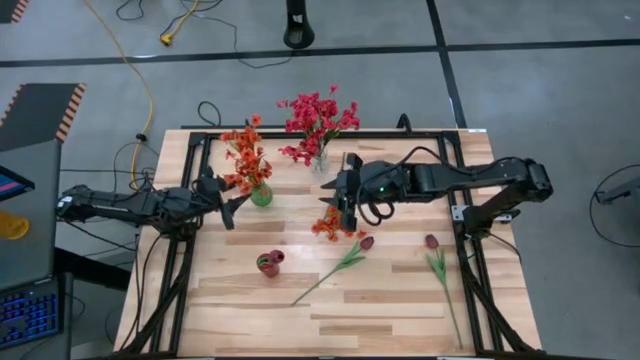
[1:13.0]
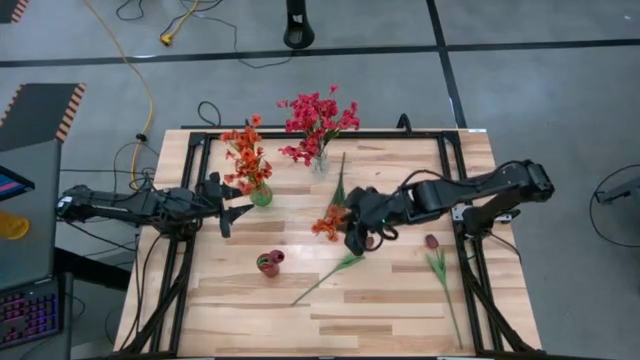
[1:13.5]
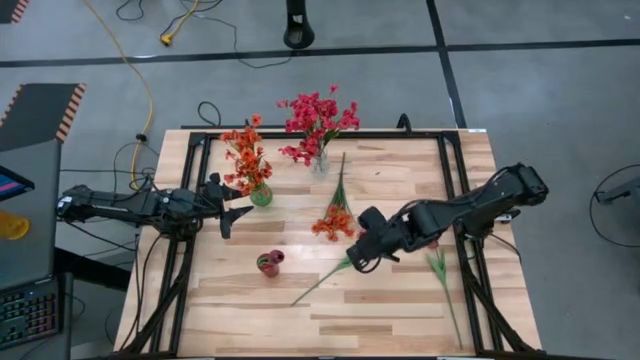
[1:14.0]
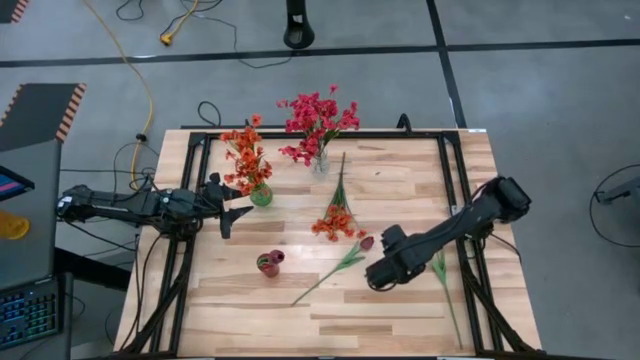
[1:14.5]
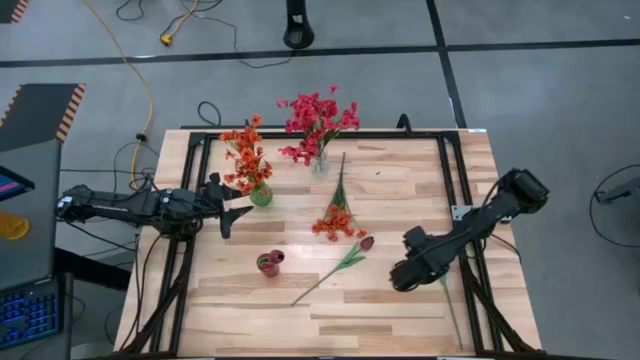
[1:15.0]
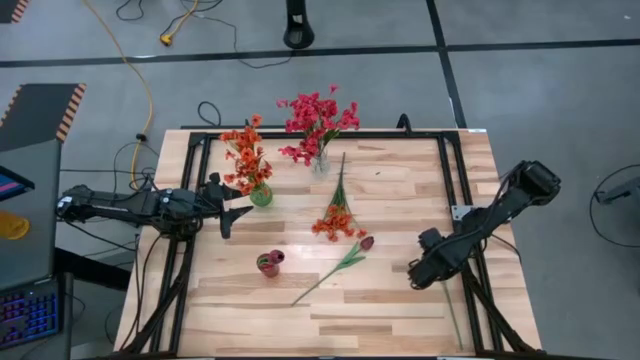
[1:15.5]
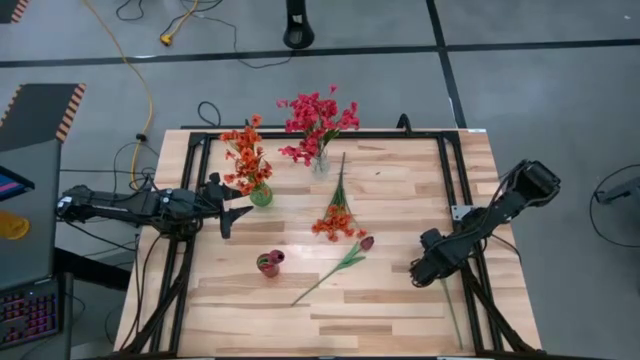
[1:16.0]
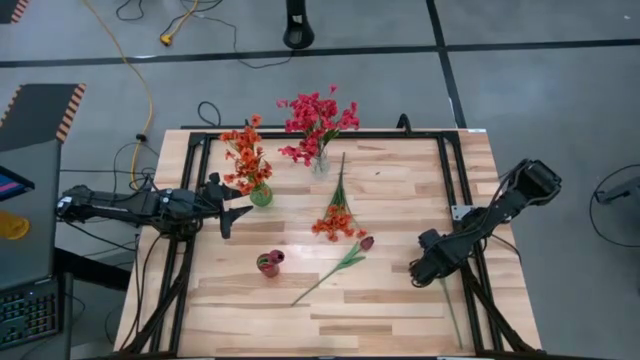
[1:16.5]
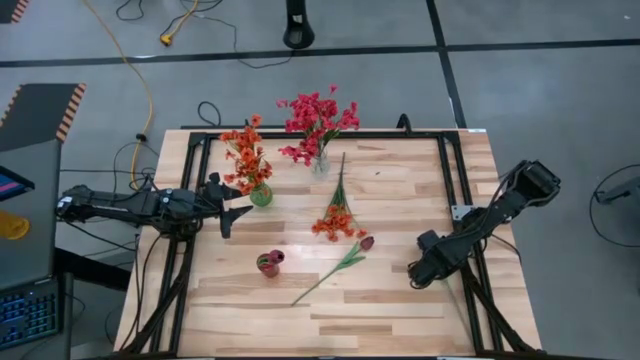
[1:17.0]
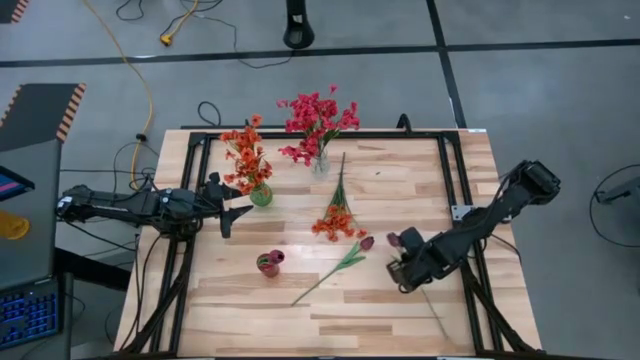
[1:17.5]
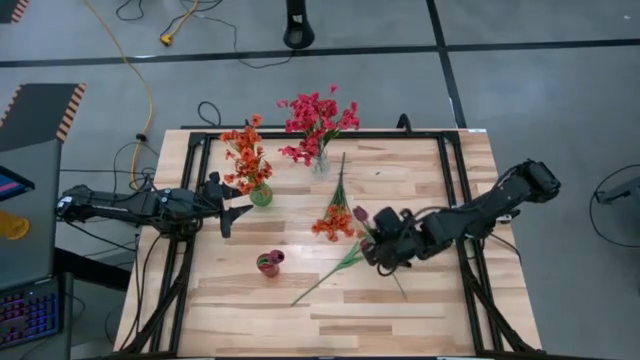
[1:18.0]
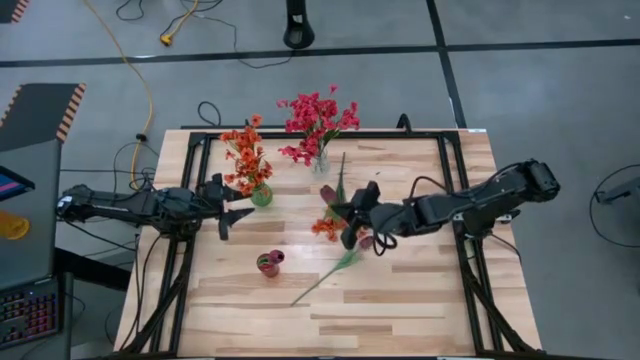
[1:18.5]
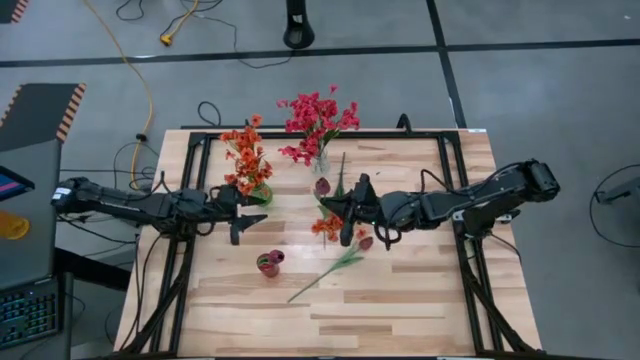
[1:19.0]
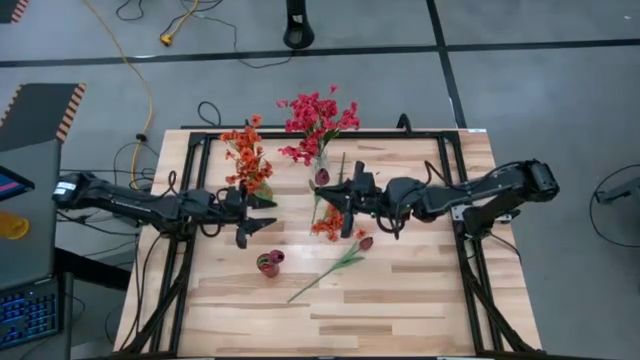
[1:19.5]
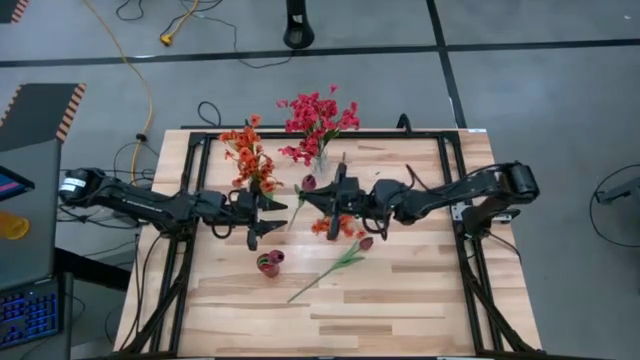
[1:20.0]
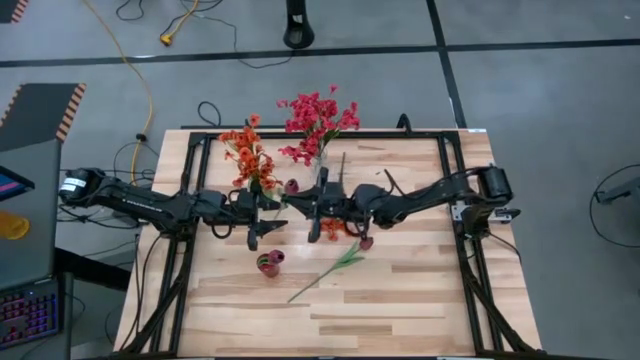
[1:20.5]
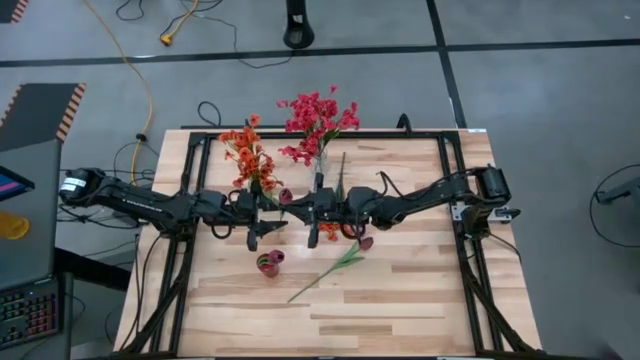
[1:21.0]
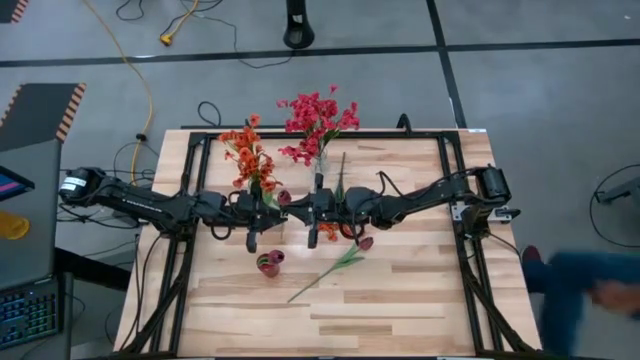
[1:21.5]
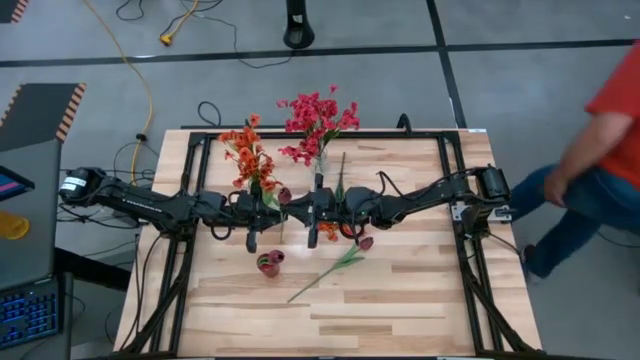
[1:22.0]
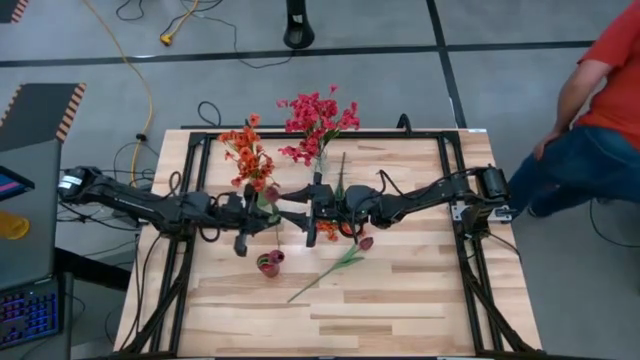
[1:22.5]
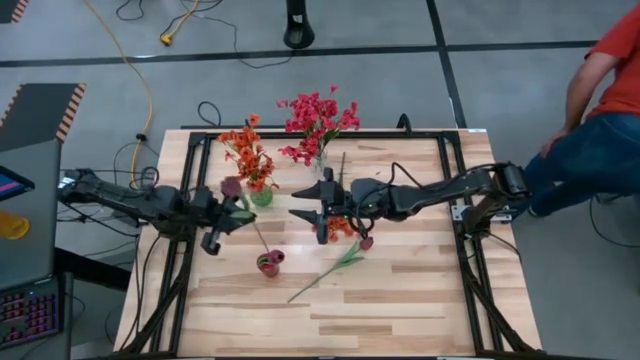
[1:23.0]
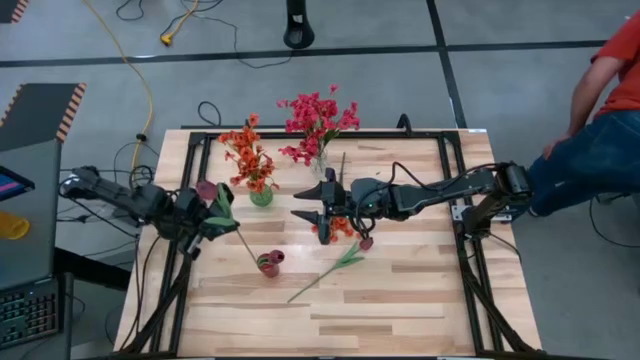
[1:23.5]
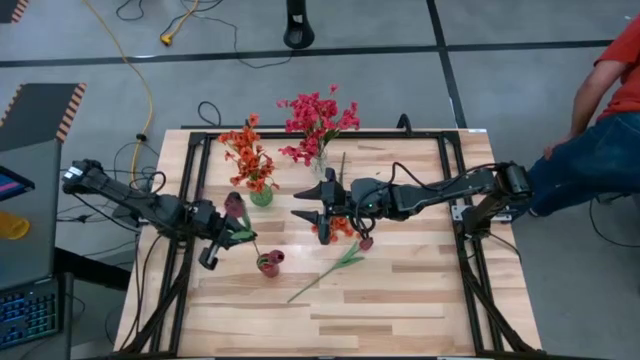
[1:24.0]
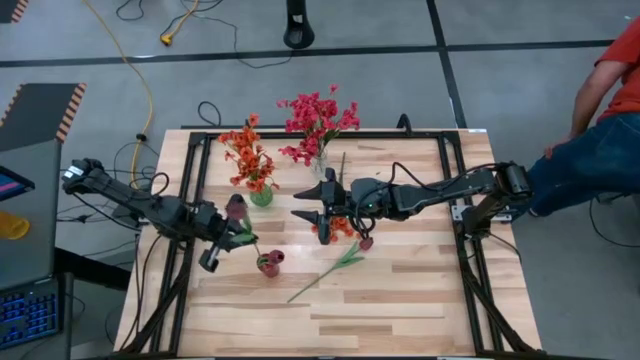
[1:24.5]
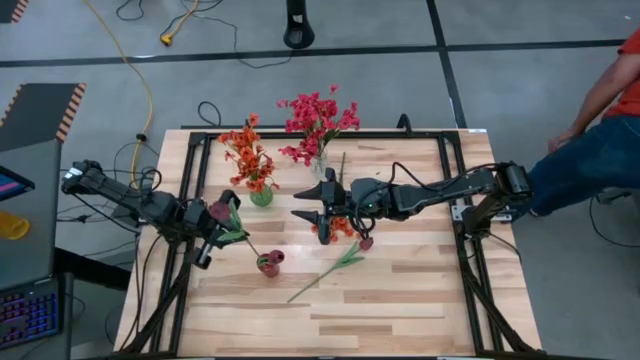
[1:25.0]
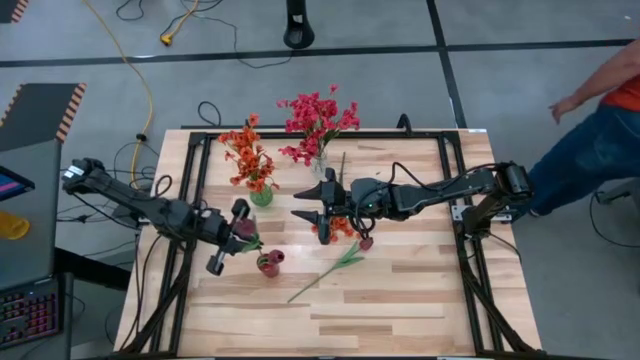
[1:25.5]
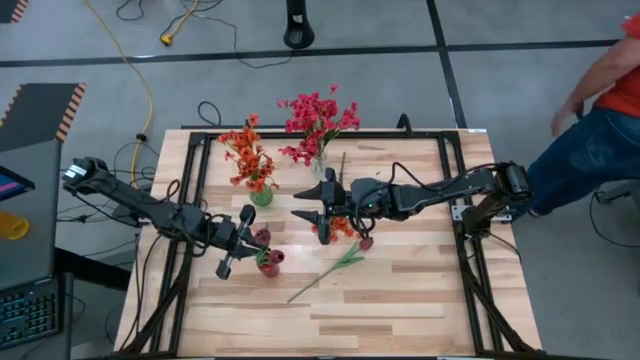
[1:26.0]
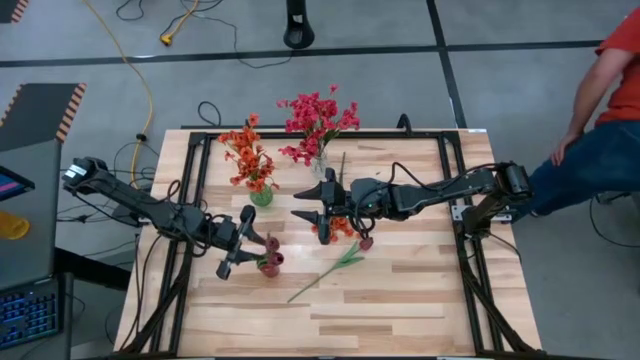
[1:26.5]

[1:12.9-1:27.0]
Task: Sort flowers into vase by color
Put the right red tulip into the red vase

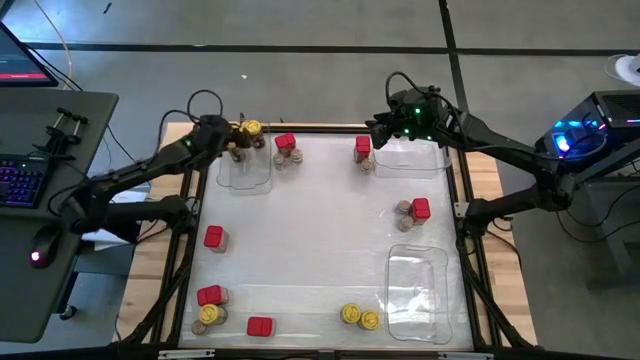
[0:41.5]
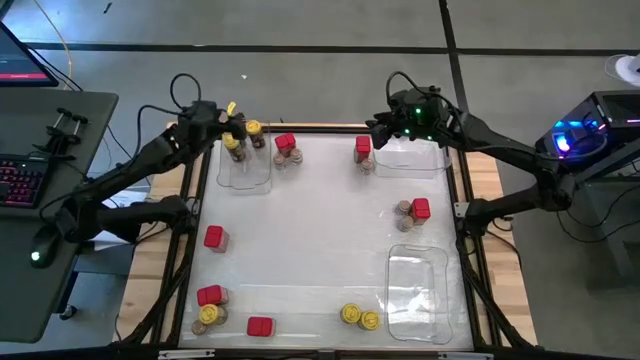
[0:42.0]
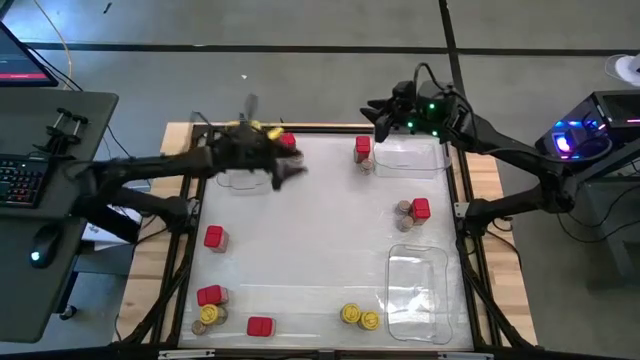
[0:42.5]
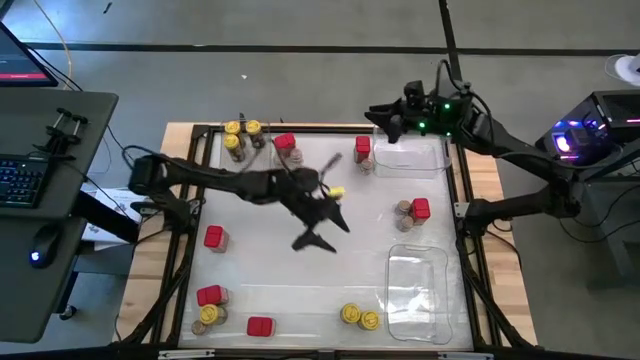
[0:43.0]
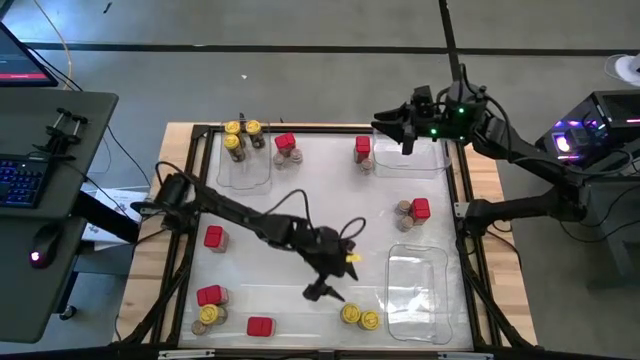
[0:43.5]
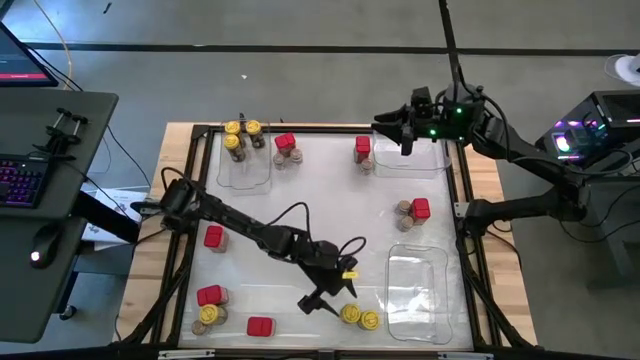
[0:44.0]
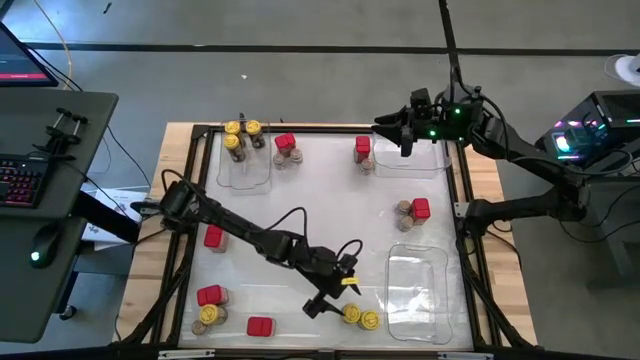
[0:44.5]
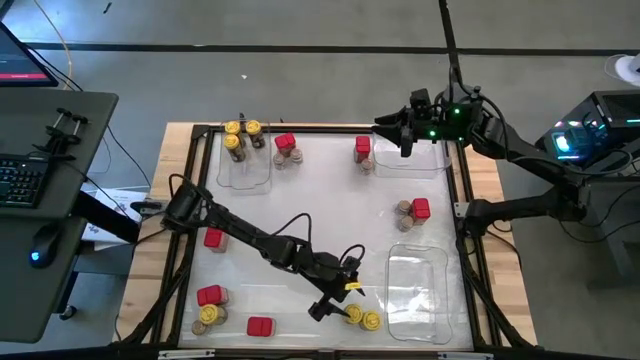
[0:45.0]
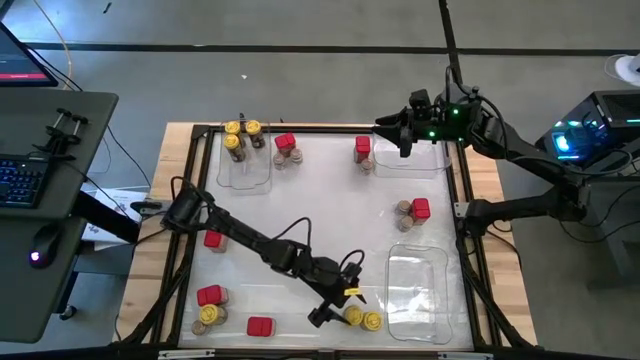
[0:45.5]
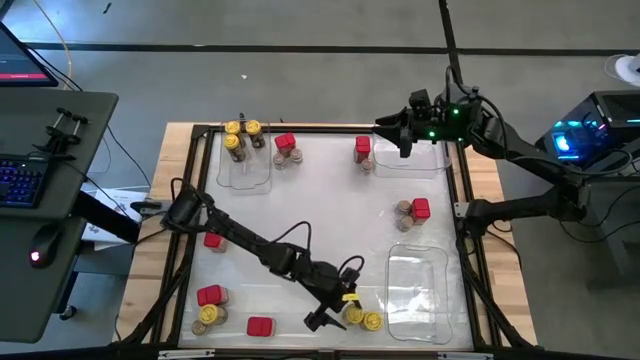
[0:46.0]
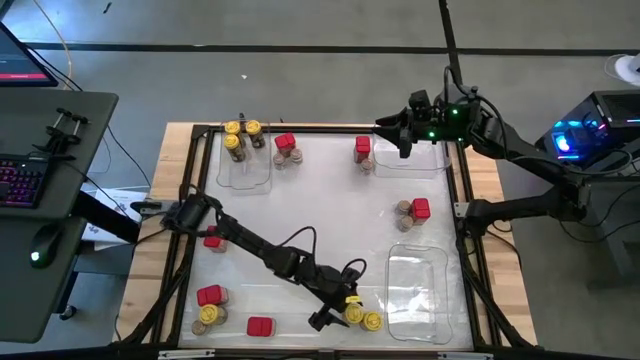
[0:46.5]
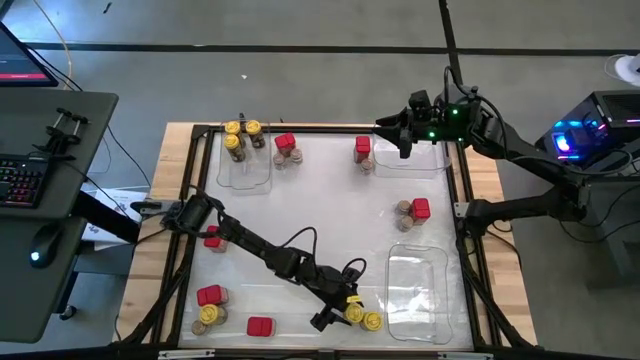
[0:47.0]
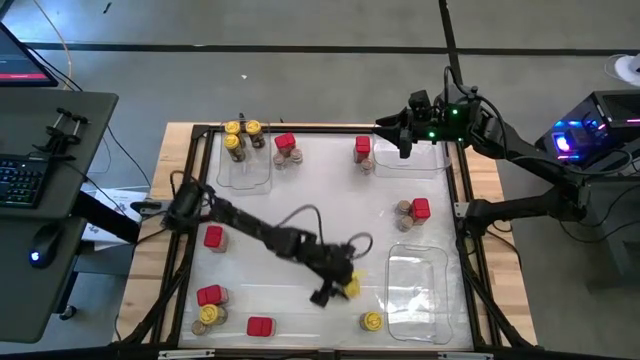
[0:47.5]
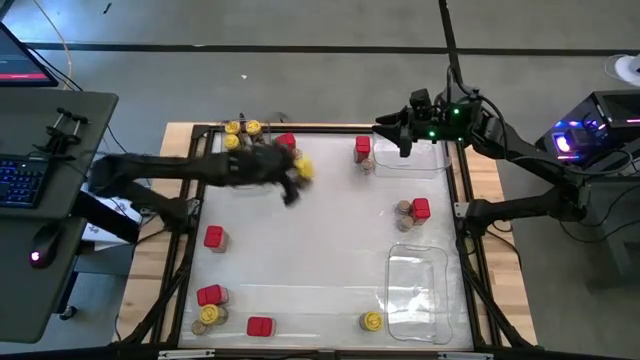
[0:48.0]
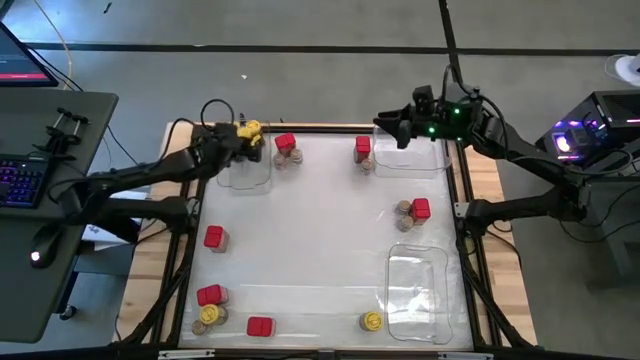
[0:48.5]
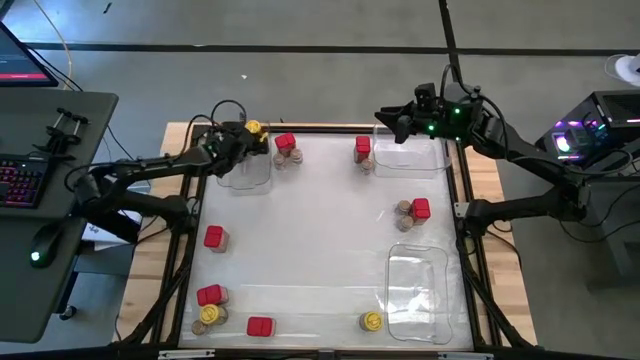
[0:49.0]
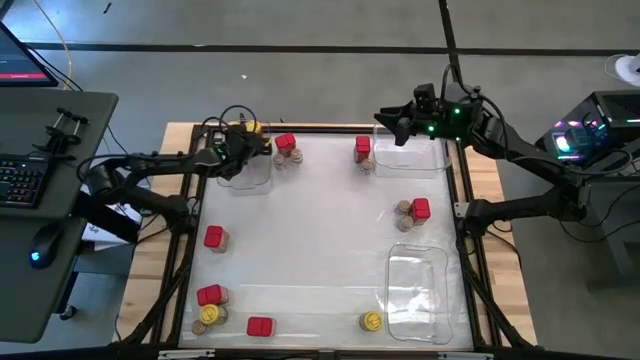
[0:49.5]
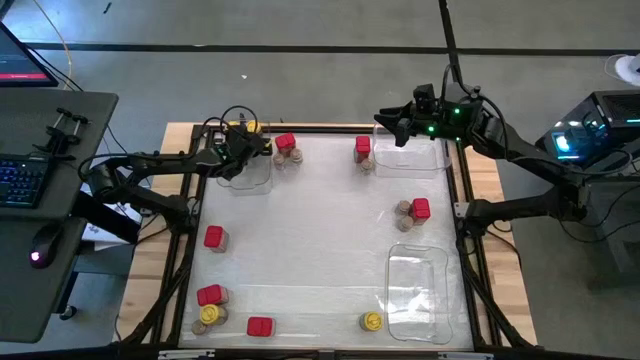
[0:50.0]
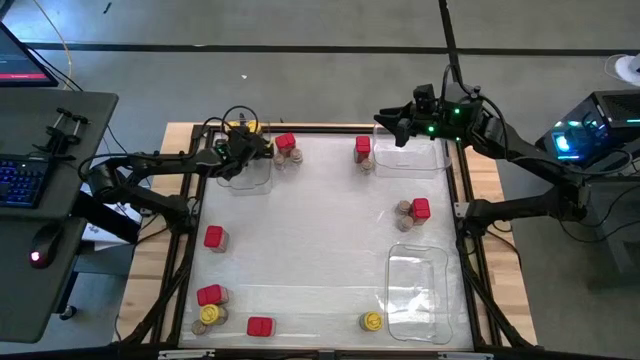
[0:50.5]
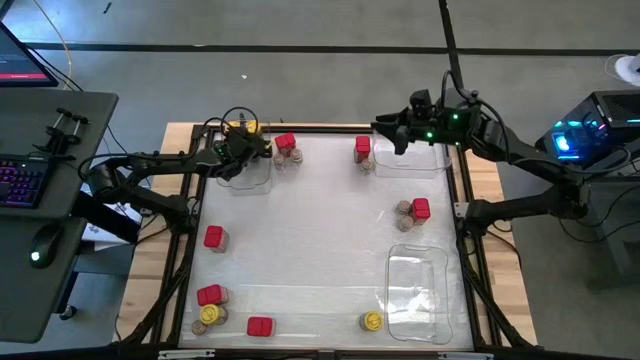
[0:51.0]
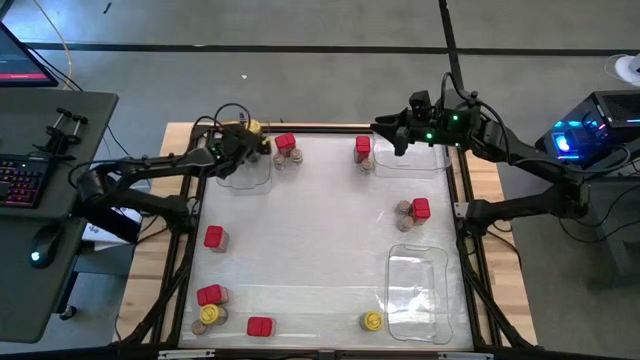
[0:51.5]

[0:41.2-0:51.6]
Task: Sort spices by type
Put the yellow seasoning bottle into the top left transparent bin
